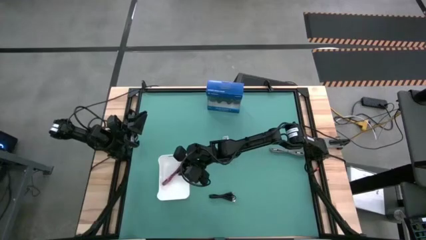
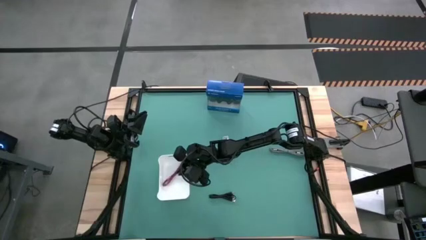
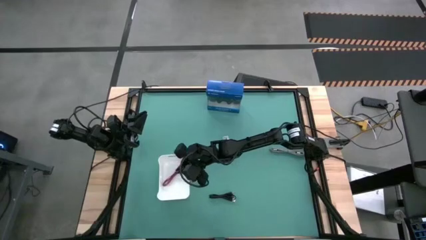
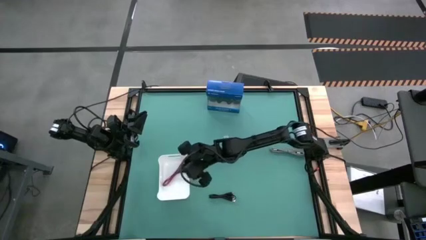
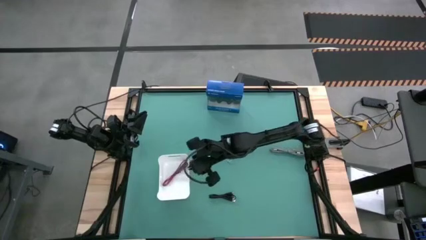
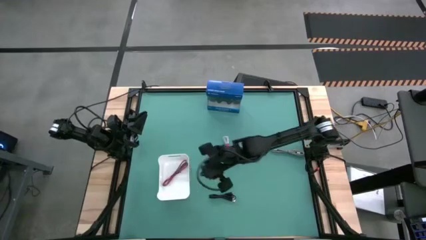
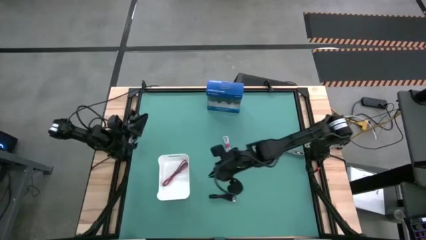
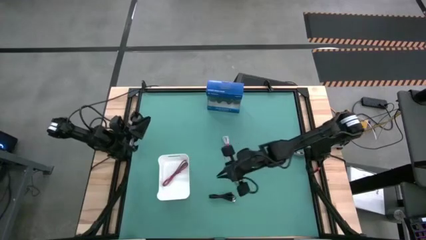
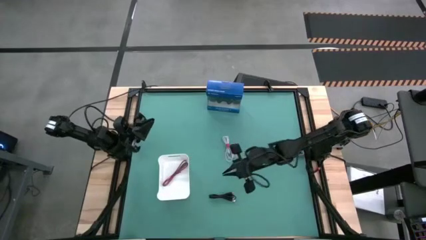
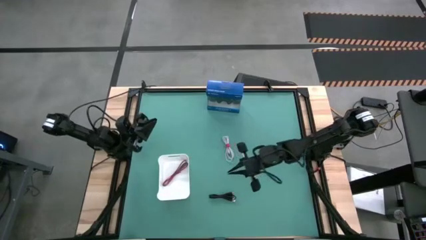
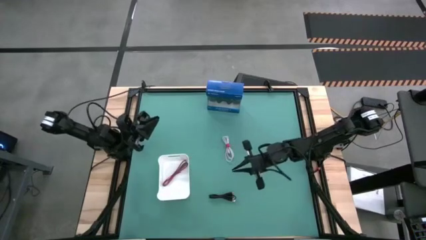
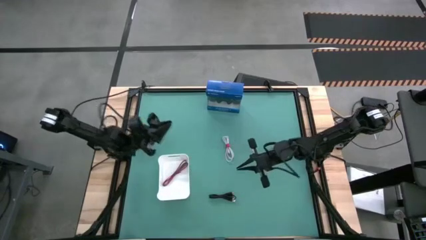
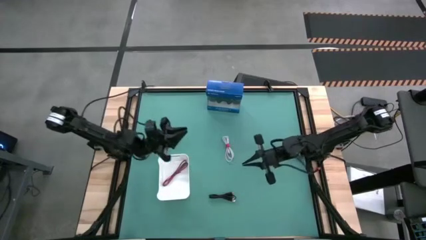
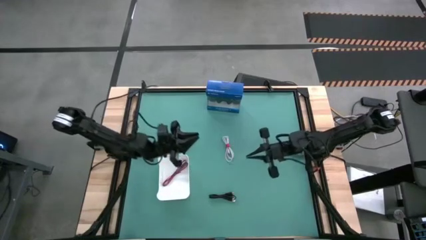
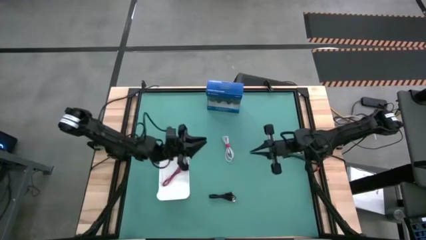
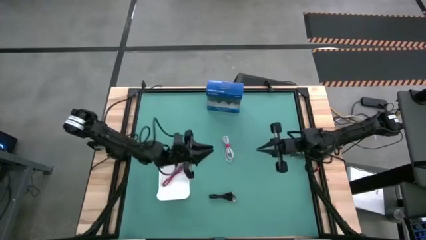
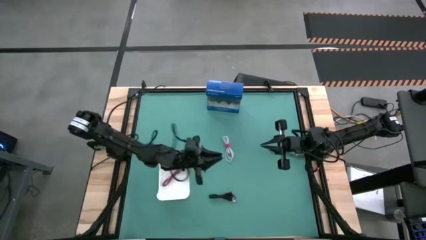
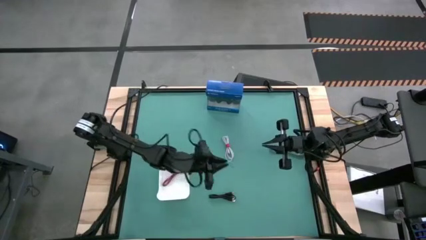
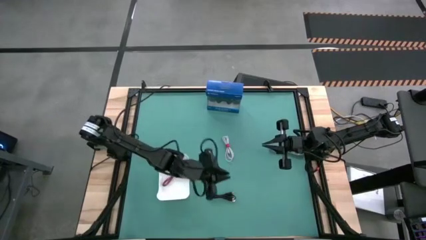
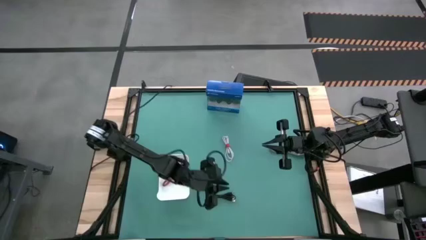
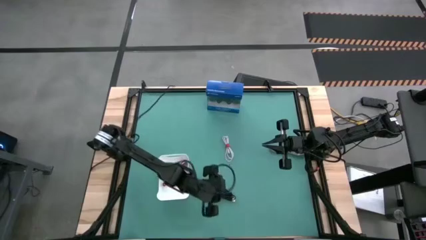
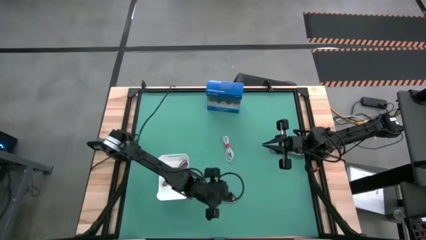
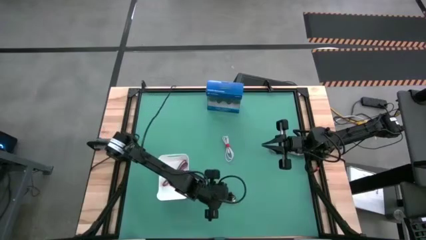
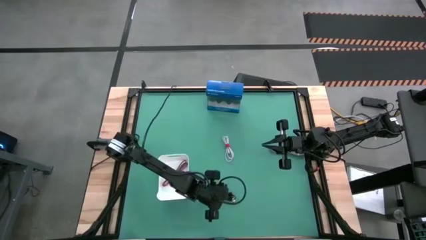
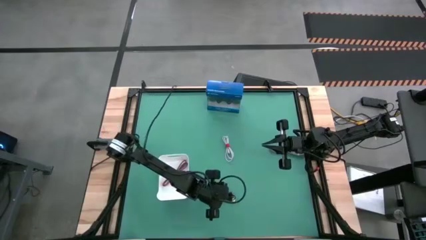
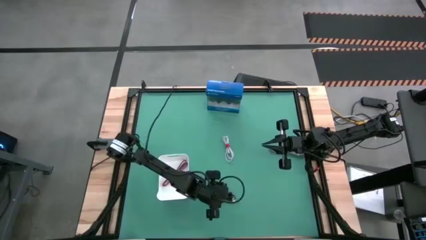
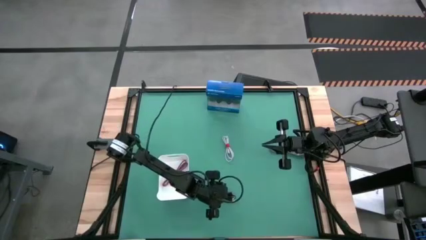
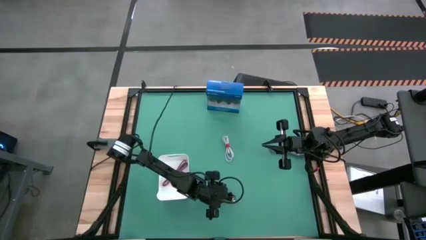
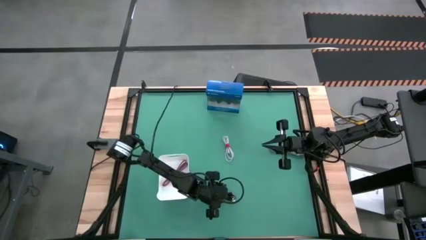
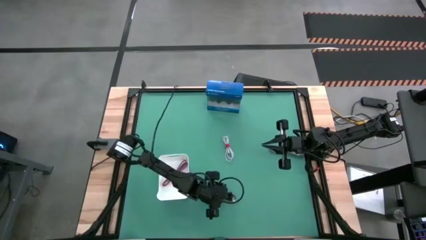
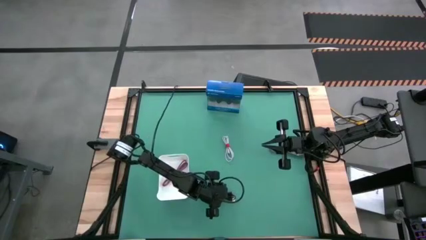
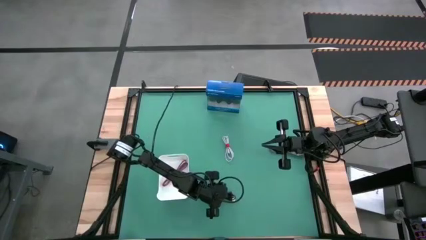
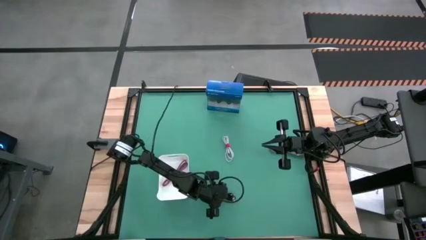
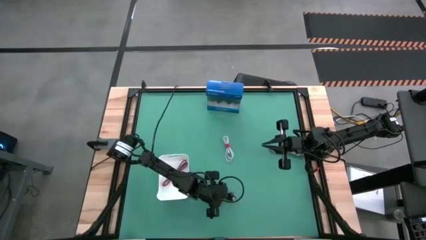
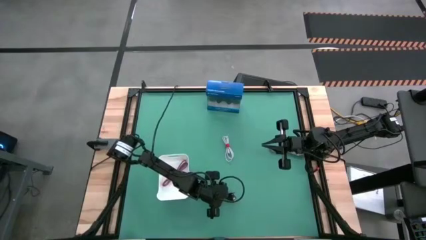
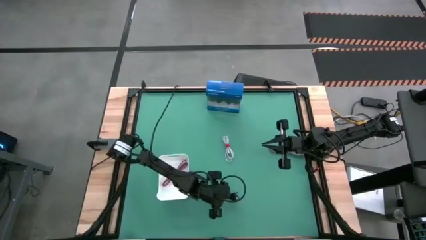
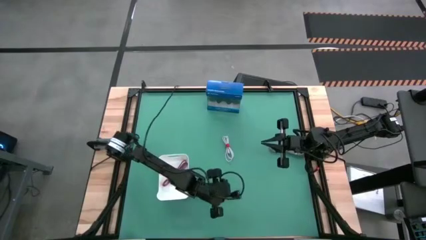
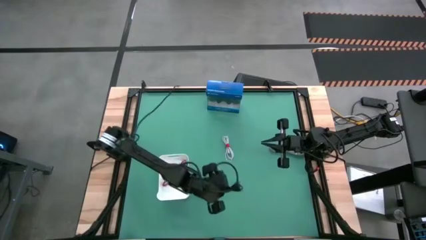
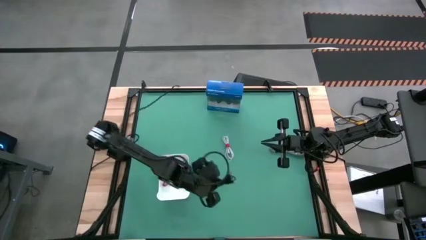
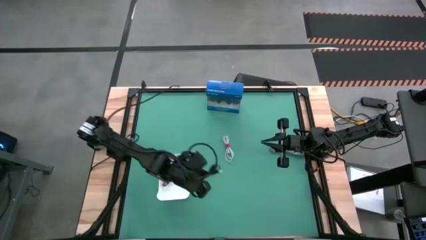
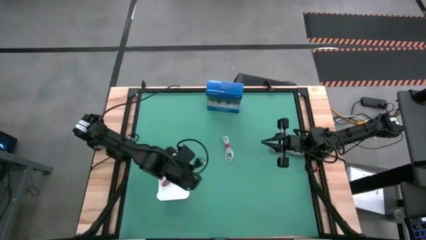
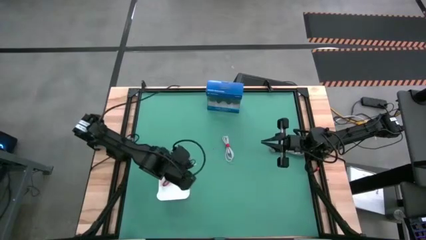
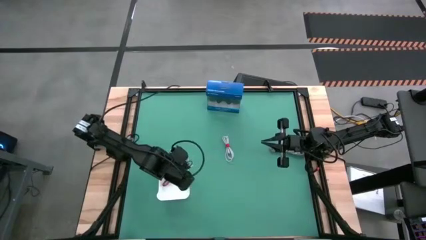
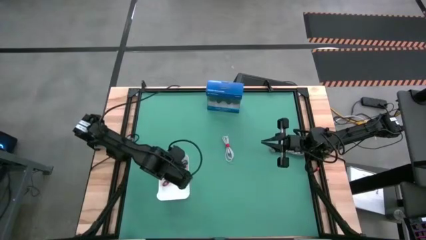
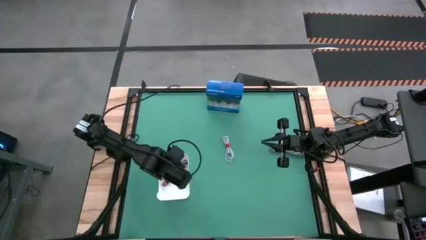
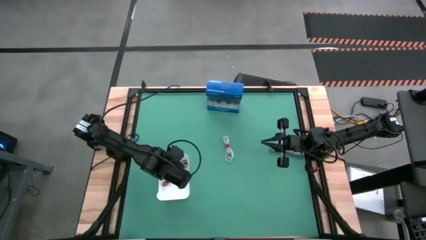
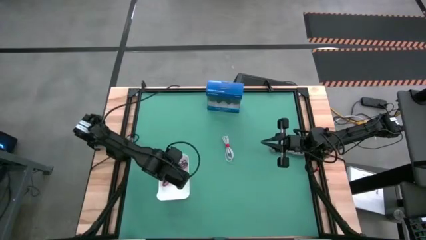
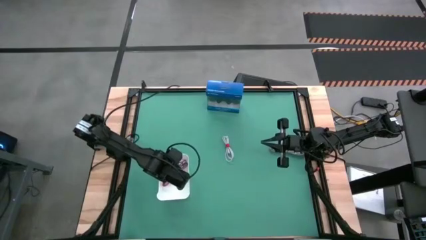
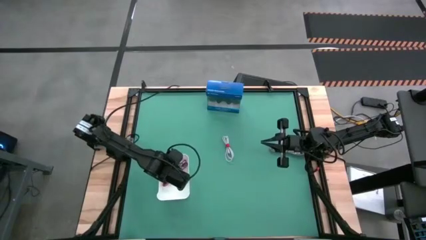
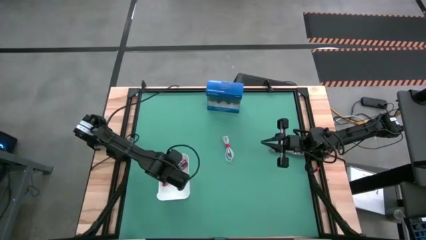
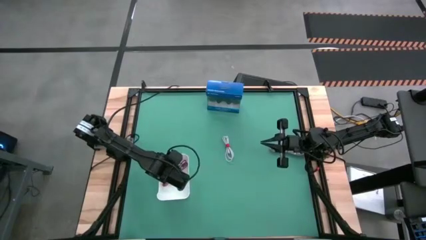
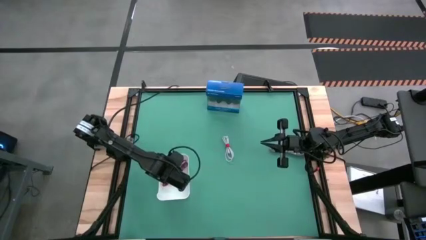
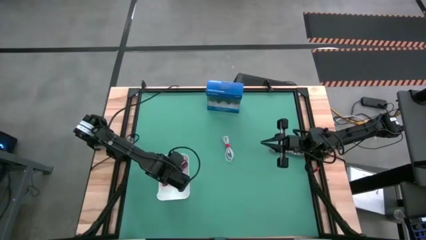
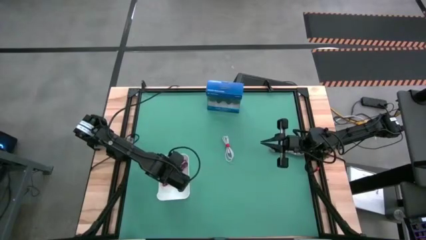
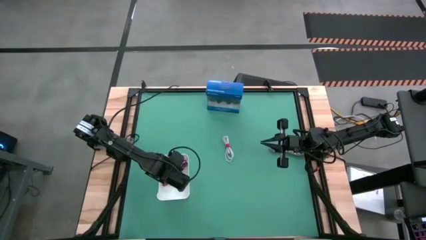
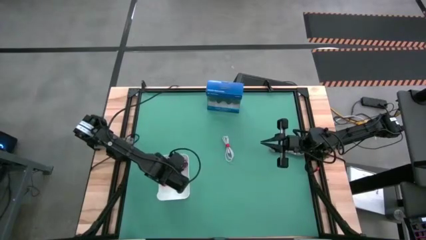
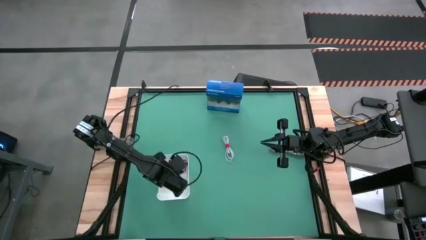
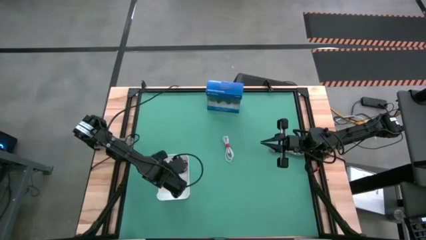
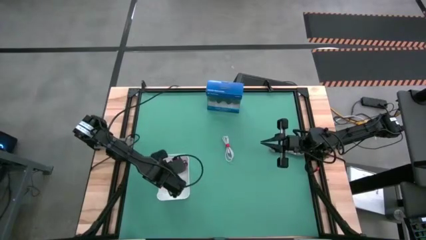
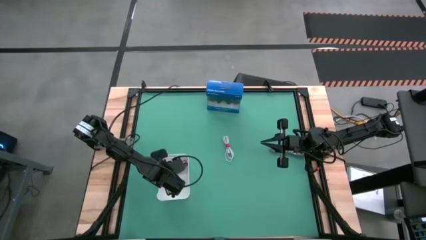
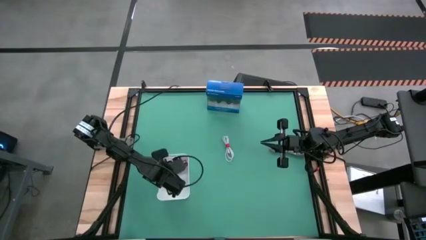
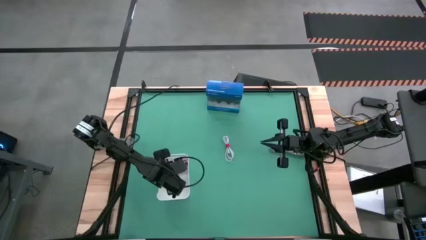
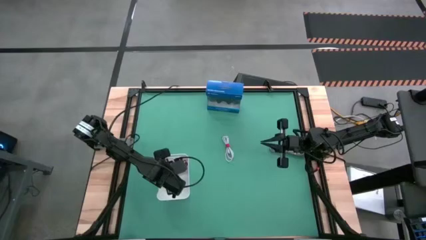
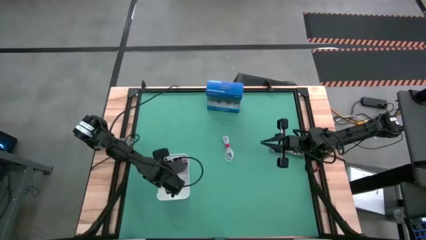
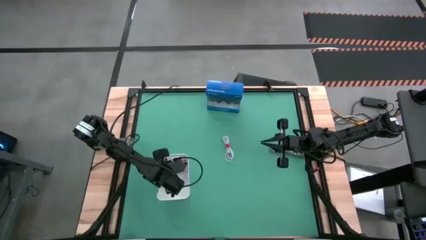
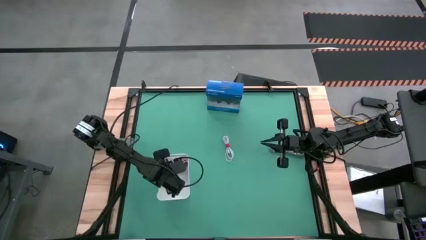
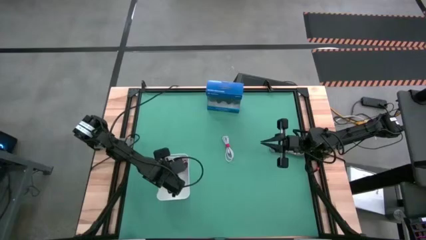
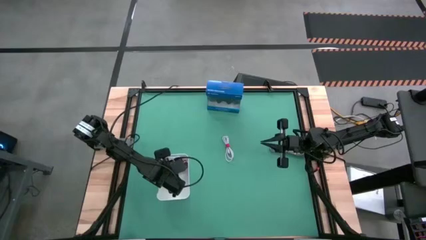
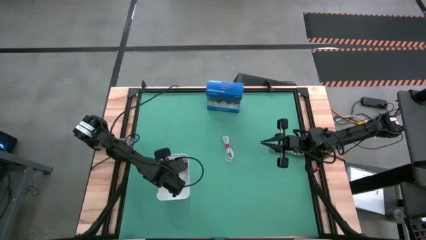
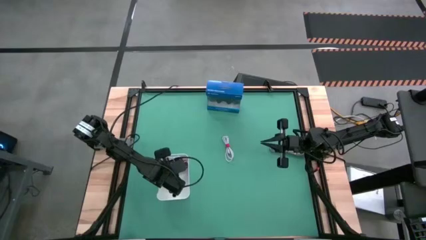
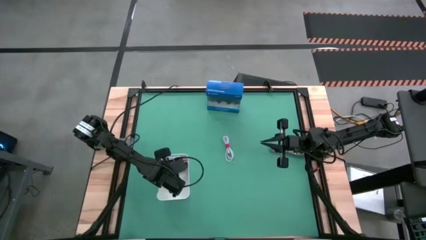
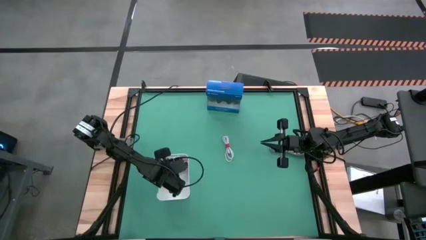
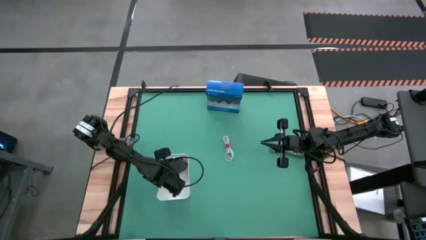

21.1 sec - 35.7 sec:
Task: Pick and place USB-C Cables
Put the black charger cable into the white bin
